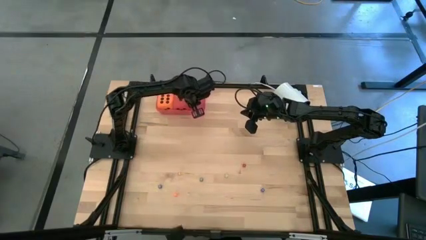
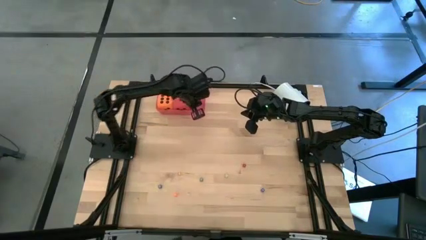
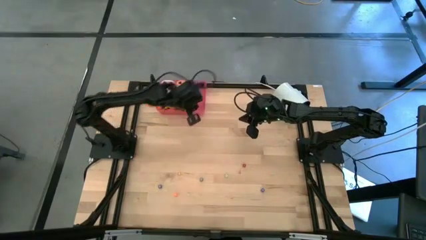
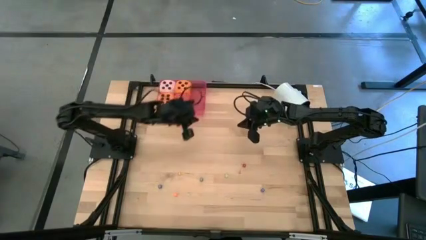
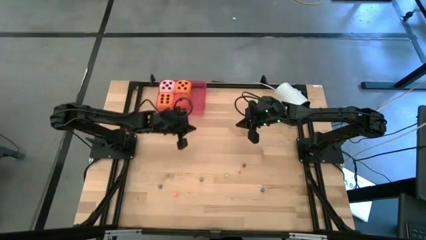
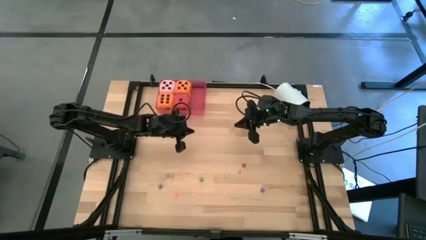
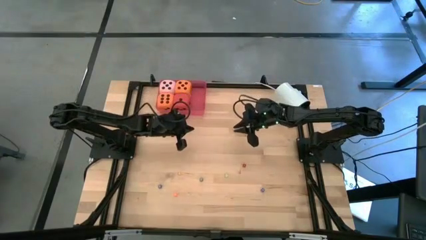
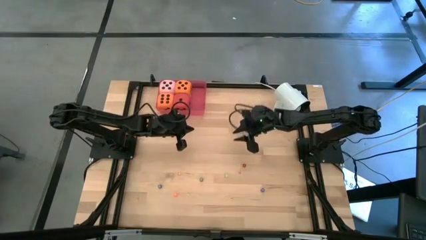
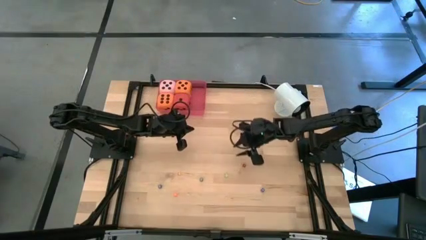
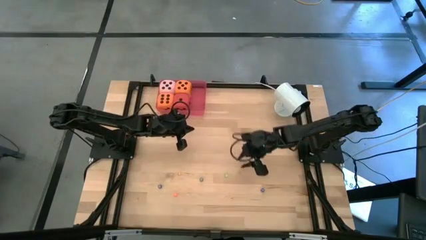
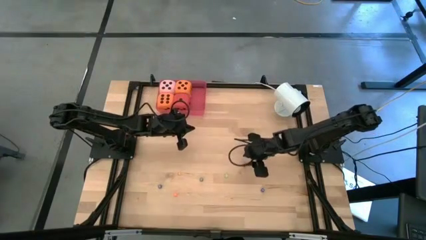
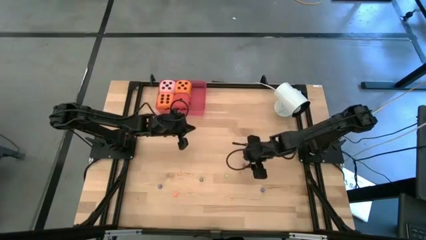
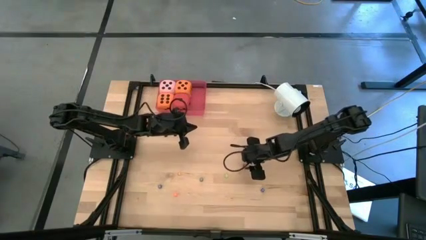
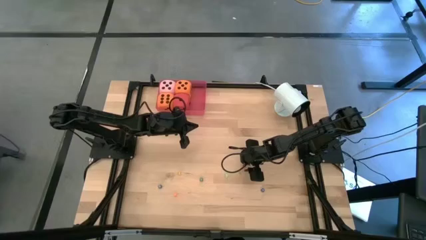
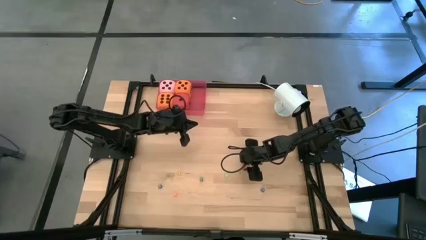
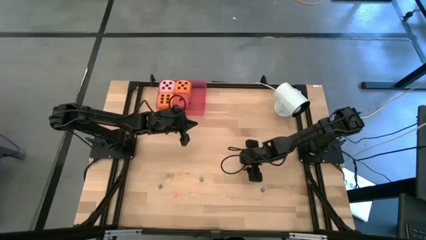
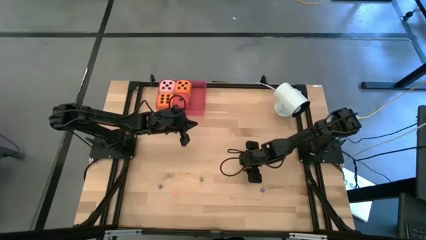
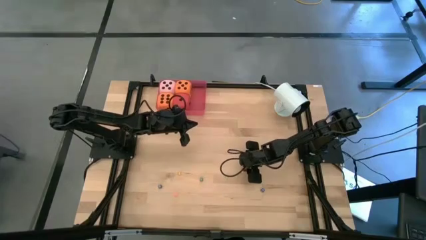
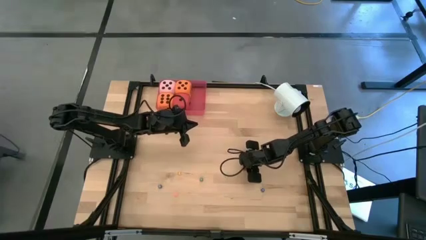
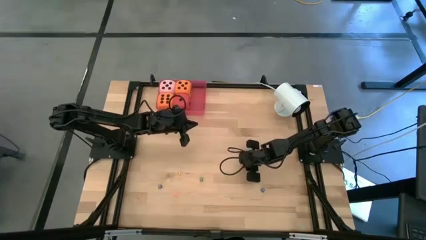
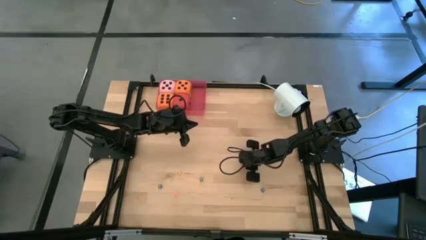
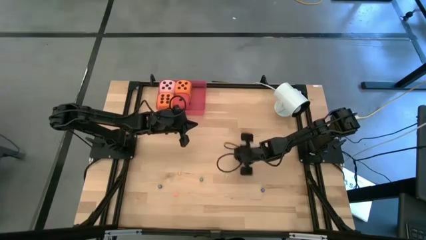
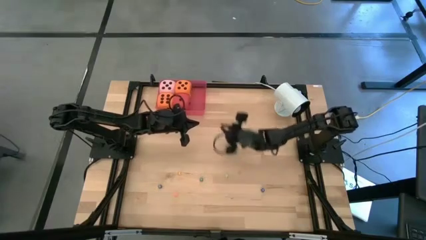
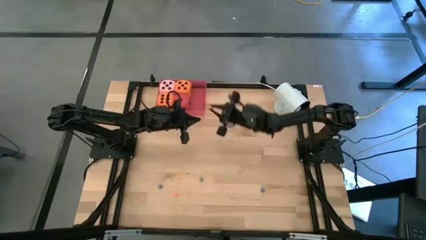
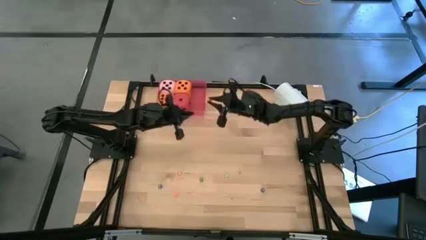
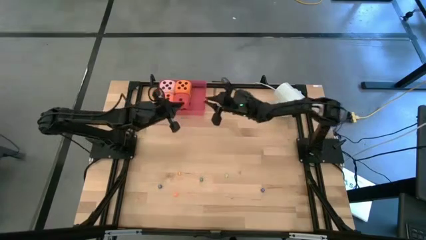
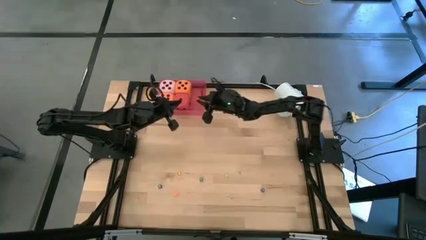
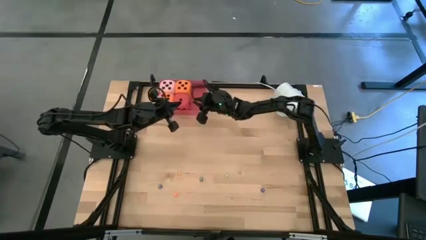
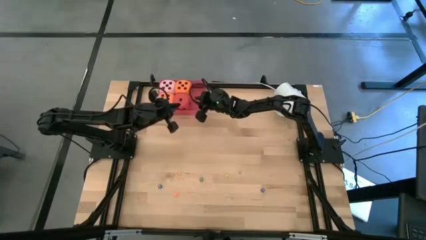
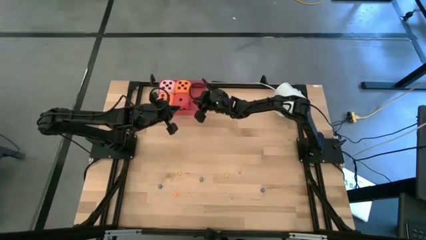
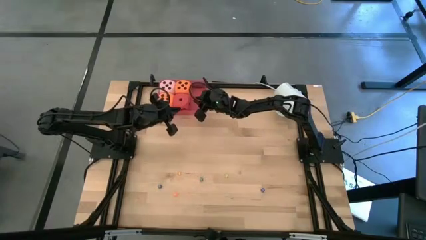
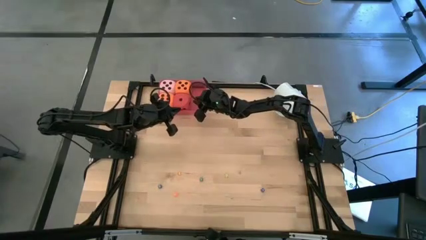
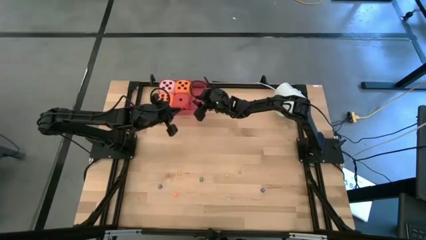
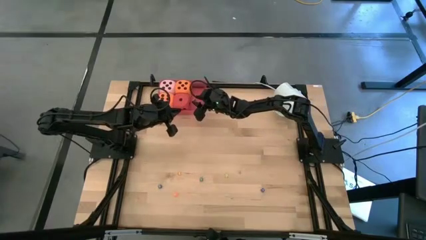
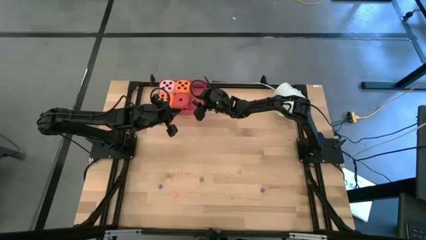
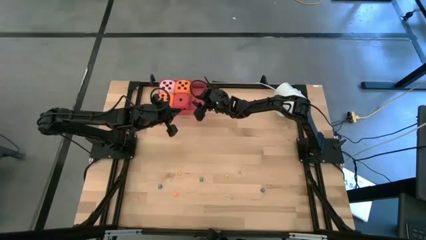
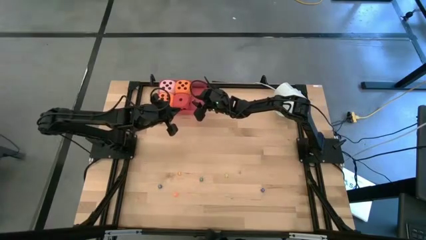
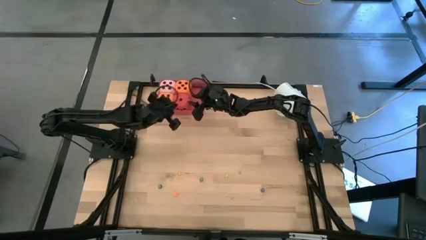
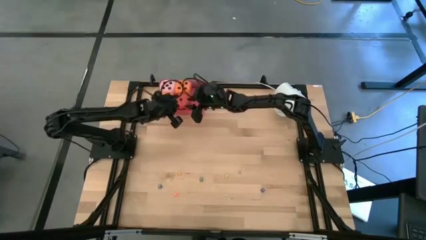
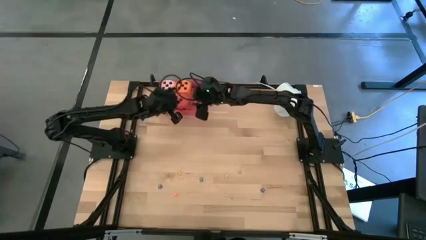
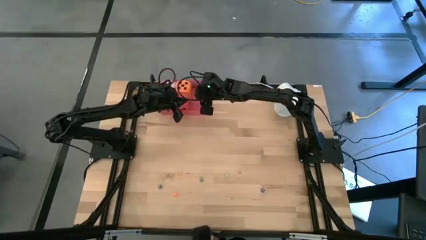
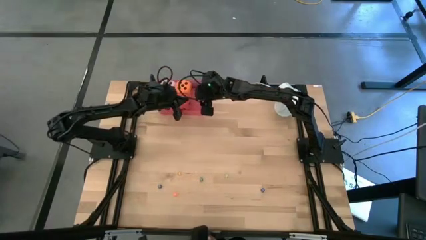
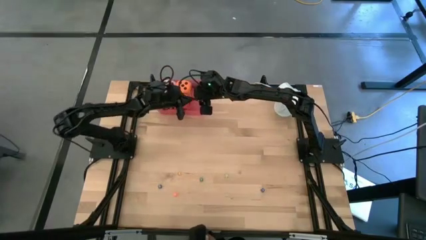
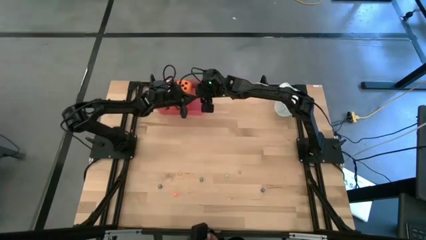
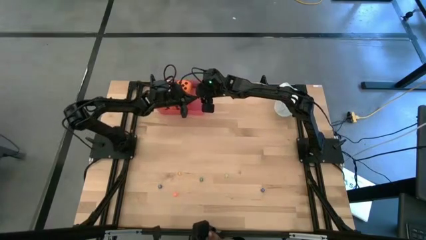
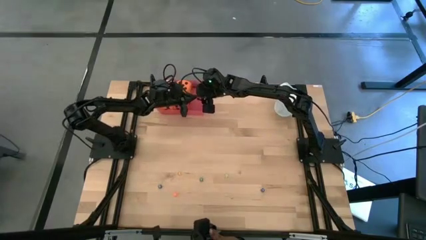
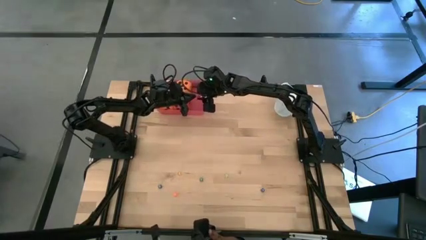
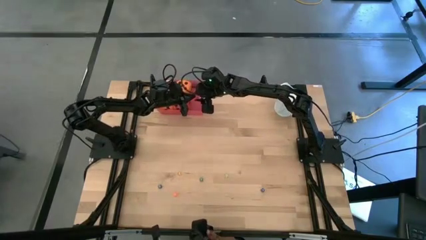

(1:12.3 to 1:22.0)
Task: Pick & Place Dice
Put the small red die into the red bin

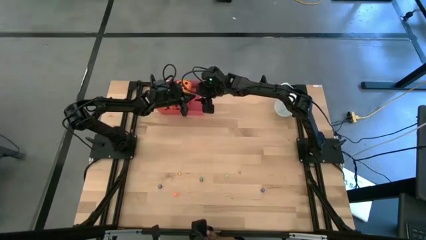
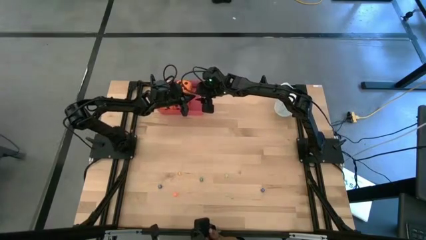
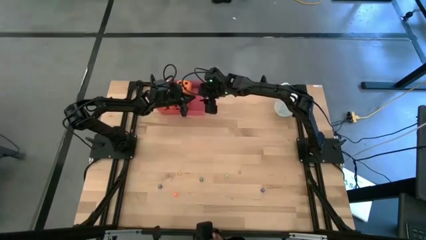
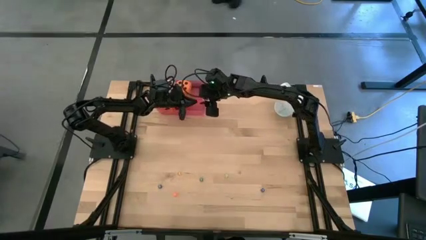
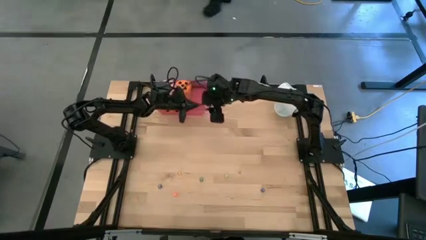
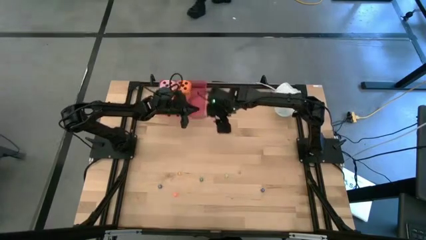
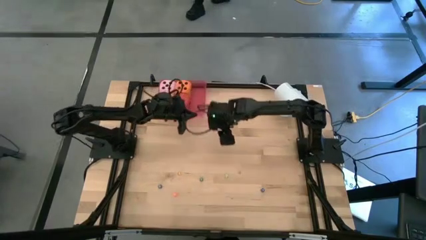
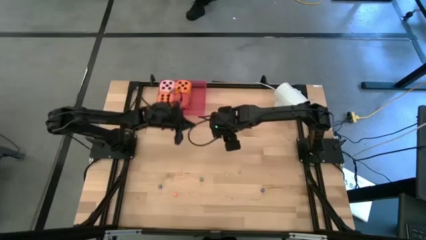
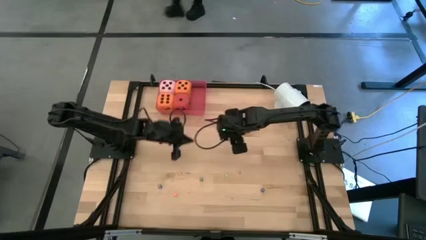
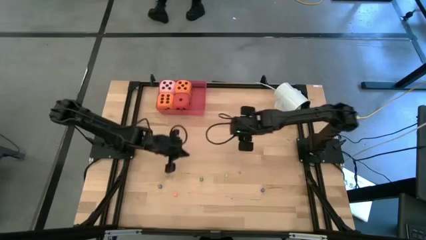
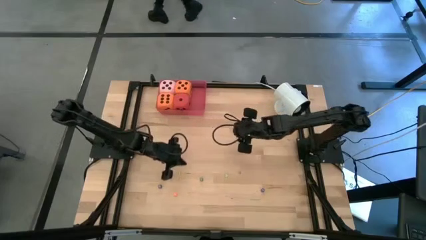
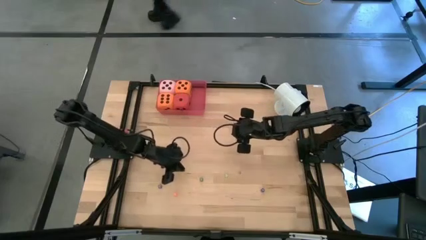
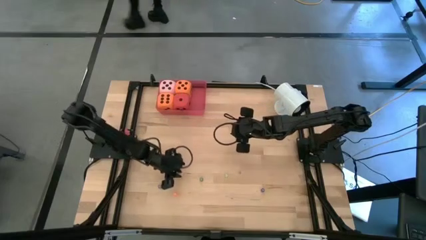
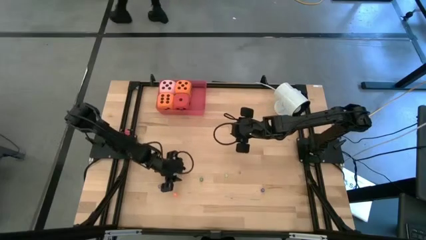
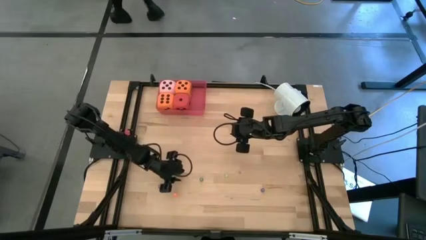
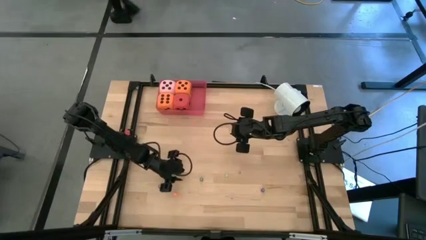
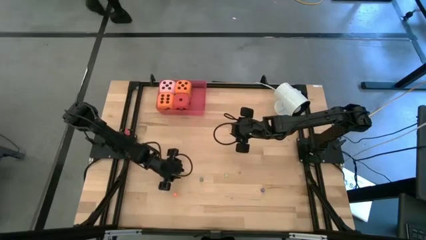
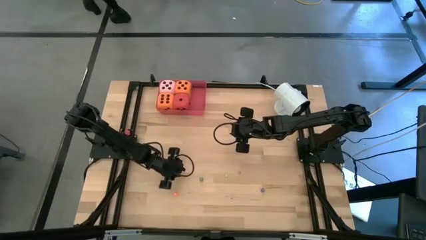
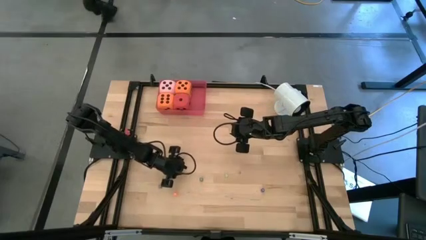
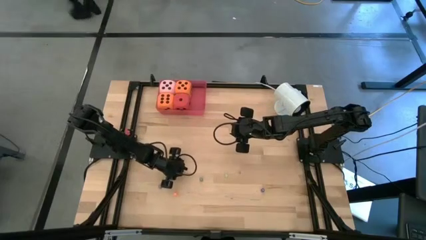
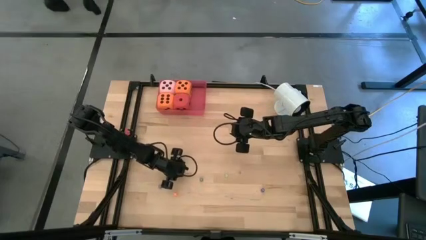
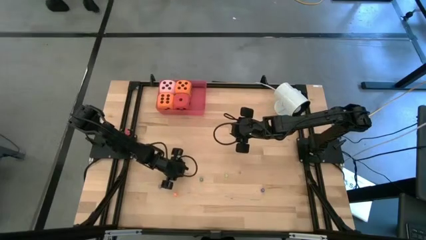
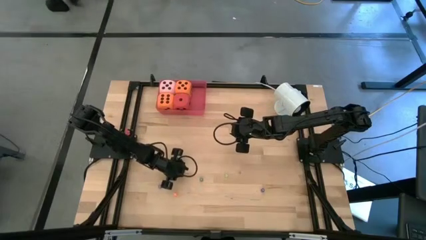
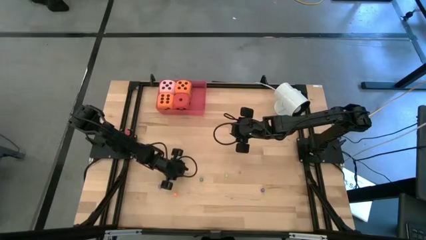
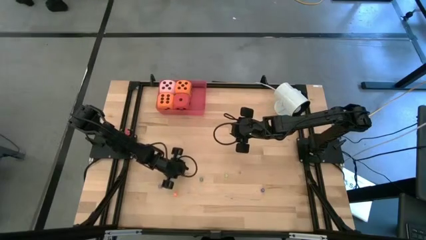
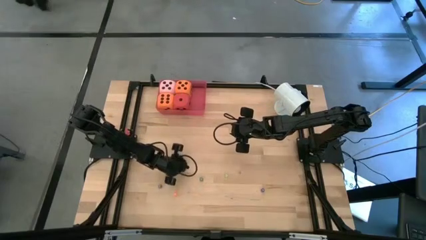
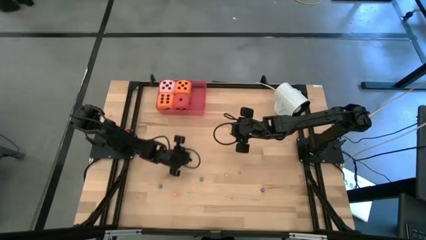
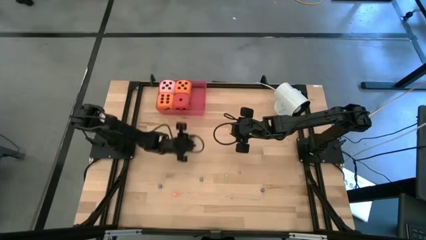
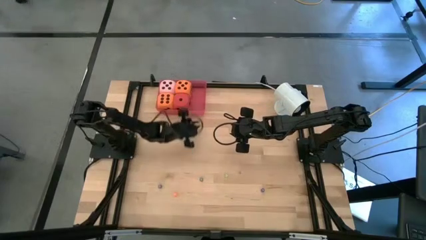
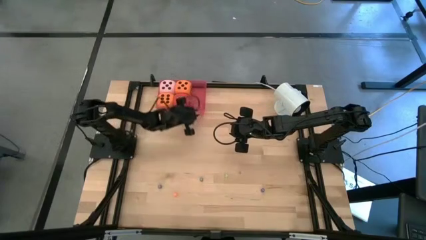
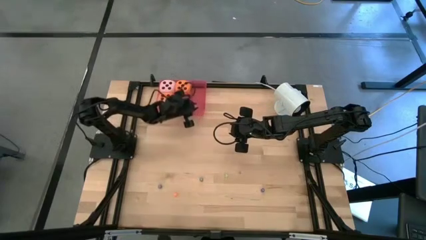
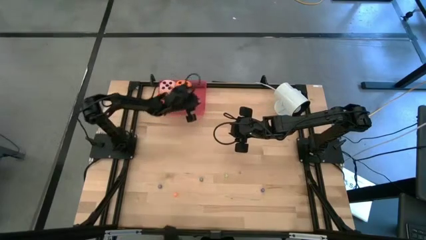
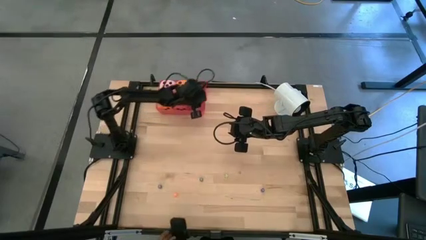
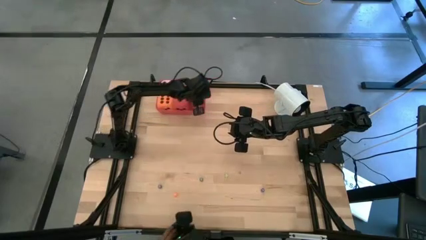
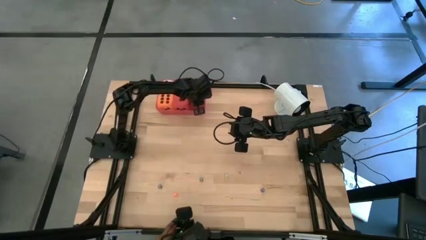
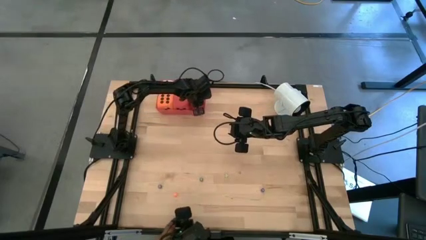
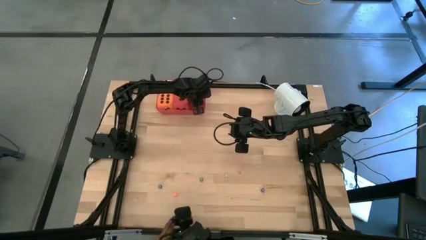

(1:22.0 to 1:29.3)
Put the small yellow die into the red bin
